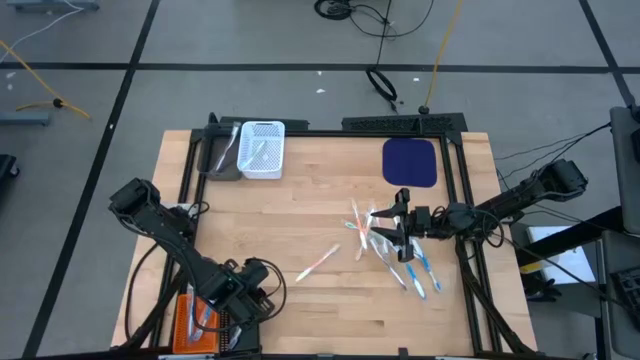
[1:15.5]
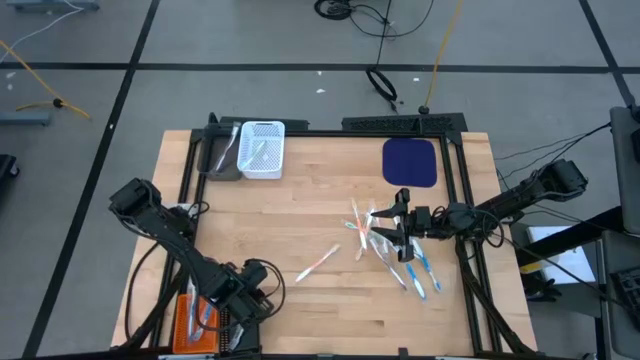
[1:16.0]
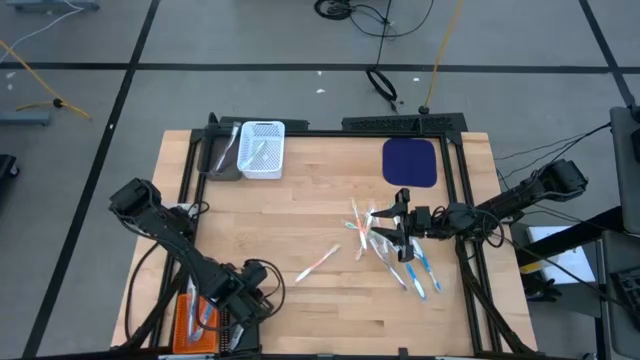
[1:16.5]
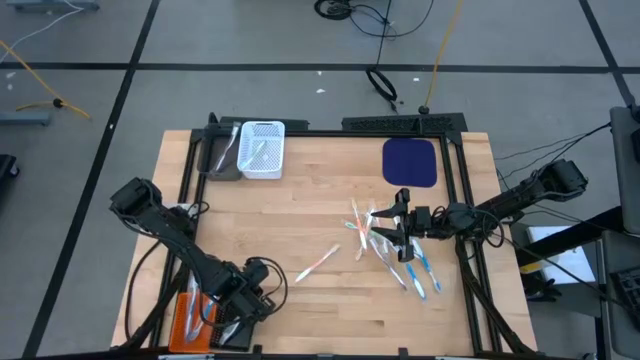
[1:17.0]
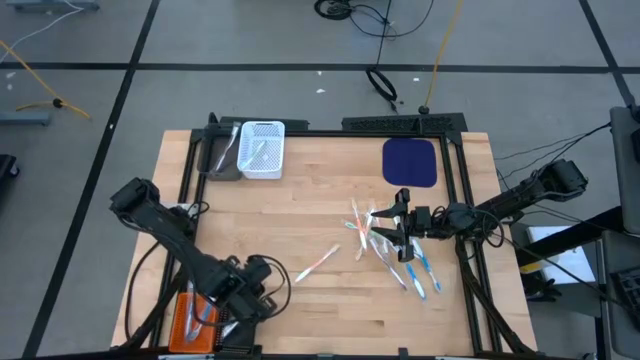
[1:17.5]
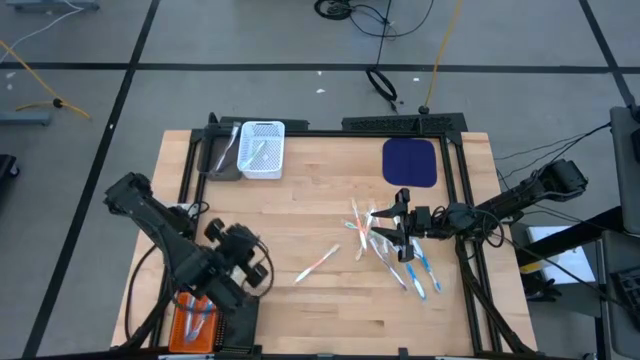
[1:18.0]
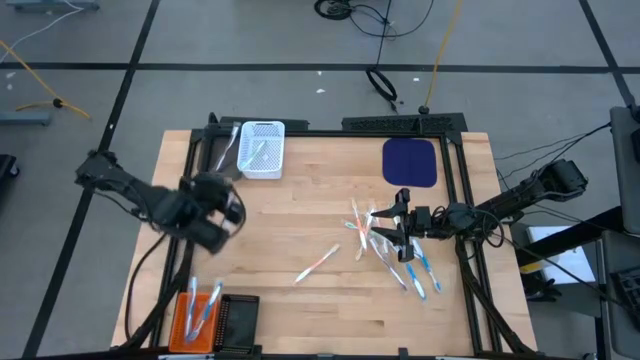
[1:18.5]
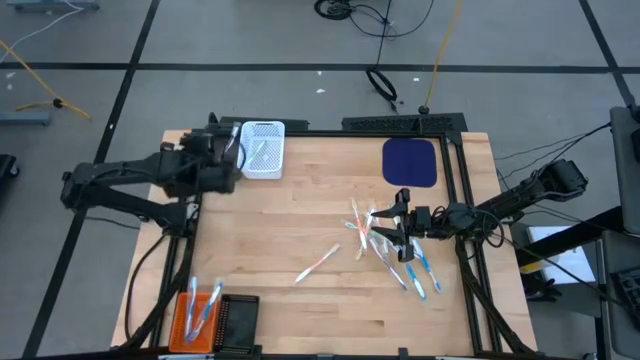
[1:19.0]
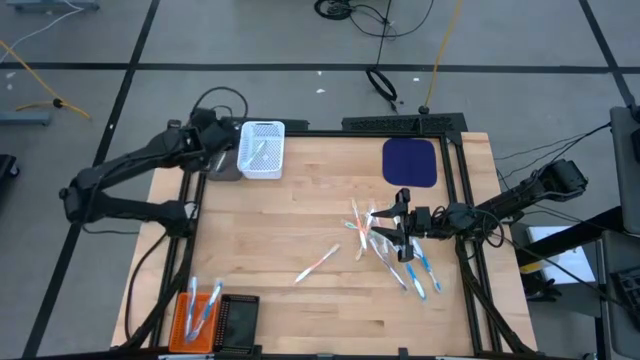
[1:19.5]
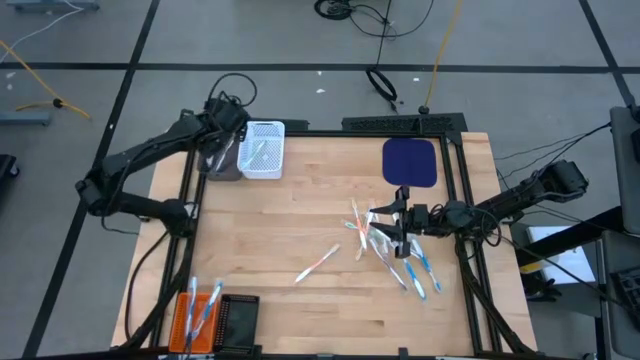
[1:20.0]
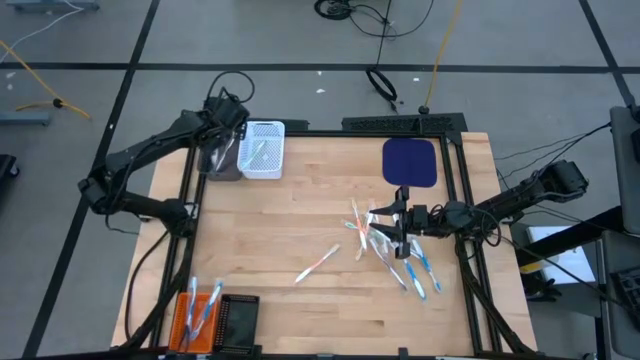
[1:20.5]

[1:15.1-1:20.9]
Task: Pick & Place Toothbrushes
Put the violet toothbrush from the black bin into the gray bin

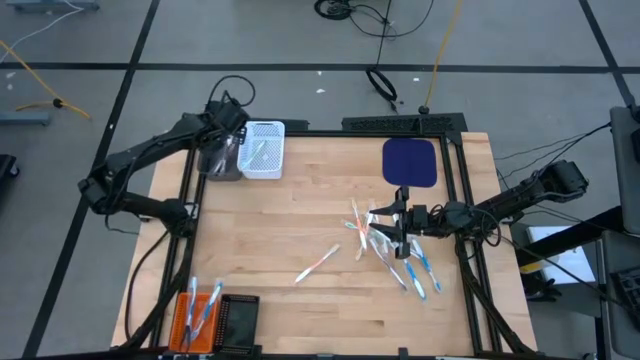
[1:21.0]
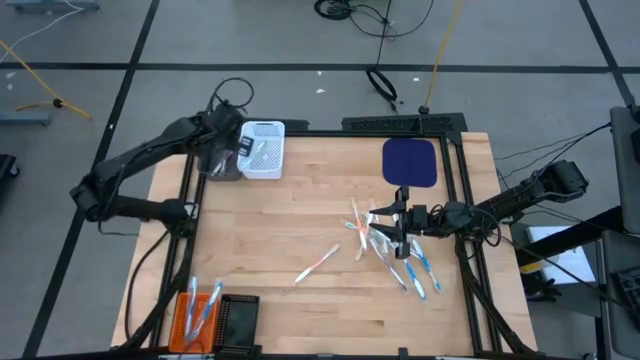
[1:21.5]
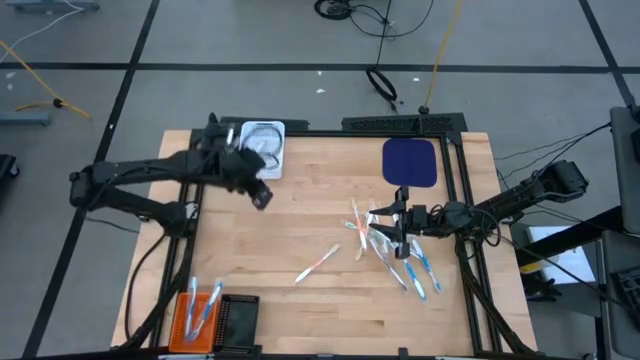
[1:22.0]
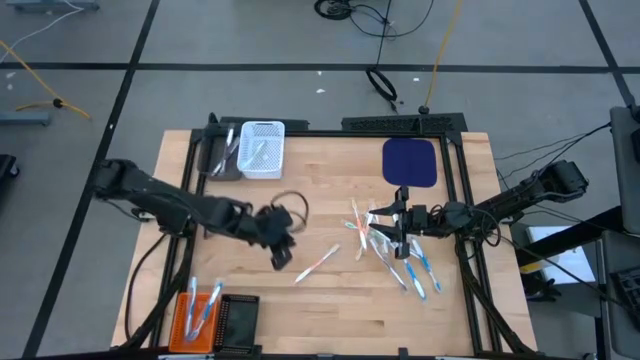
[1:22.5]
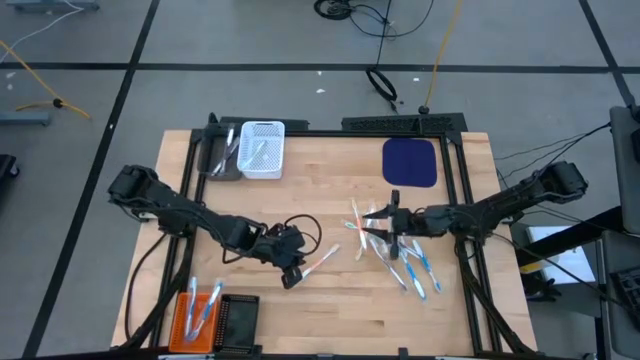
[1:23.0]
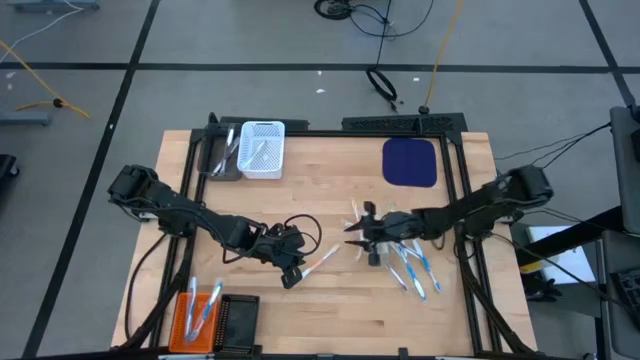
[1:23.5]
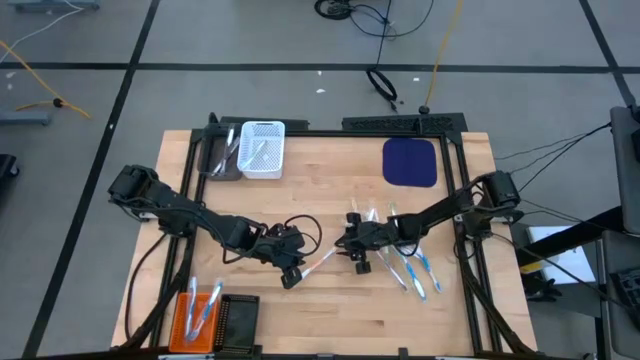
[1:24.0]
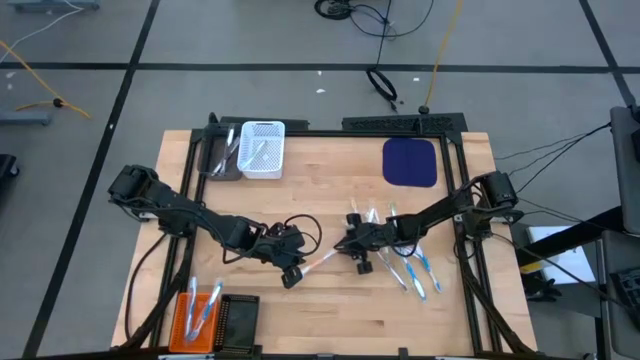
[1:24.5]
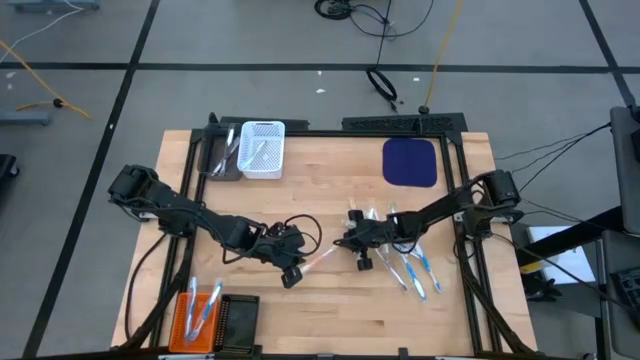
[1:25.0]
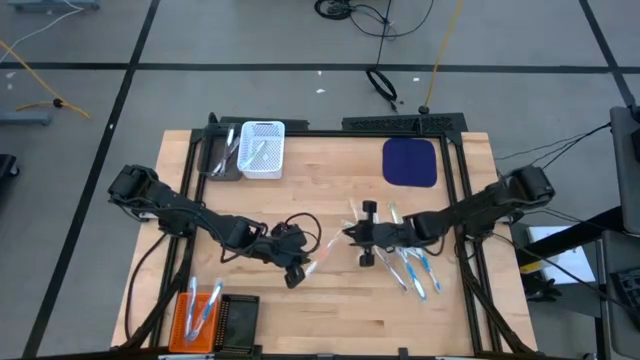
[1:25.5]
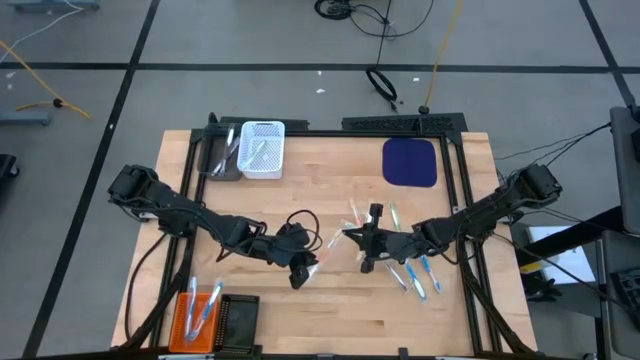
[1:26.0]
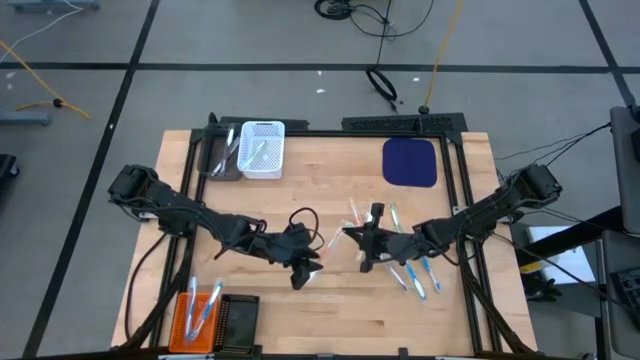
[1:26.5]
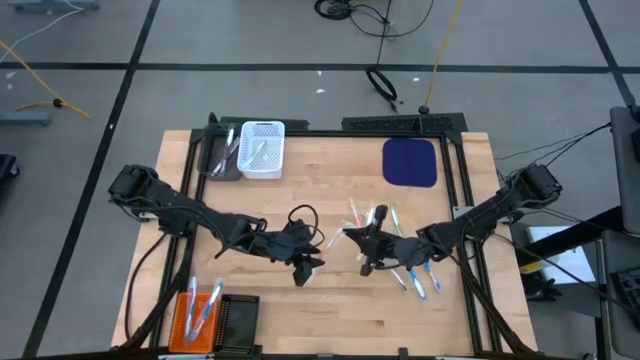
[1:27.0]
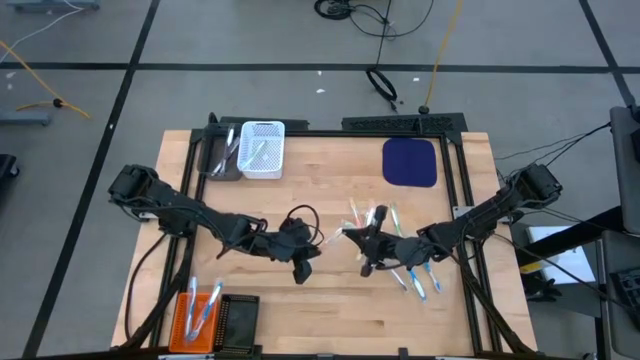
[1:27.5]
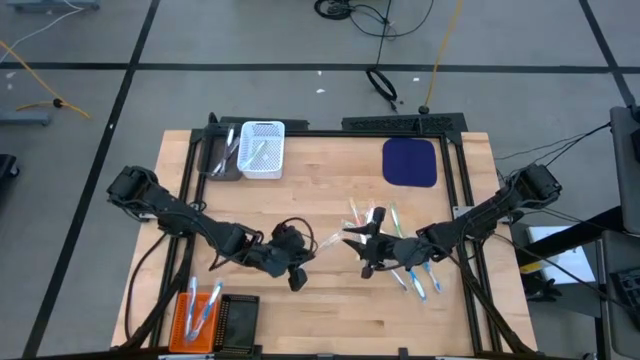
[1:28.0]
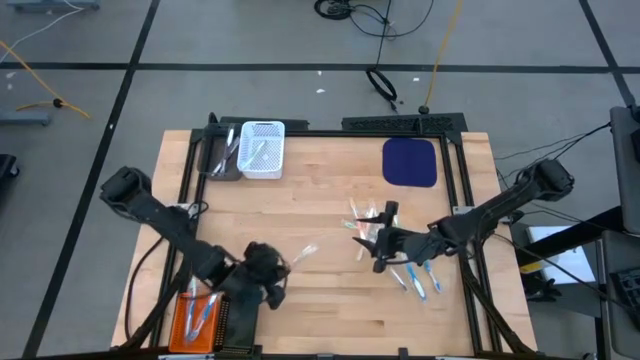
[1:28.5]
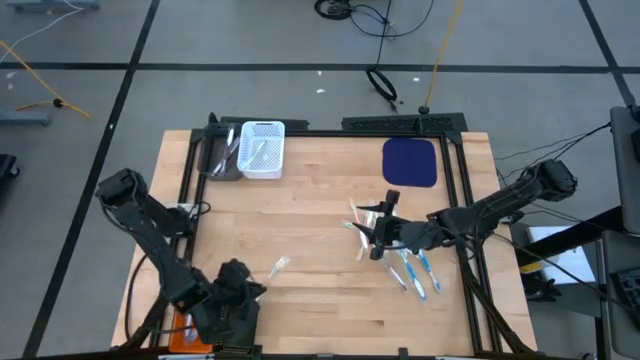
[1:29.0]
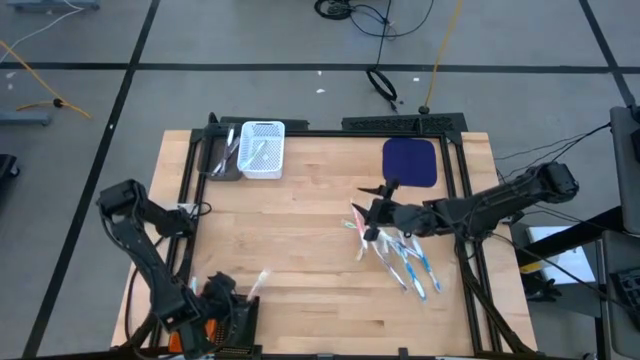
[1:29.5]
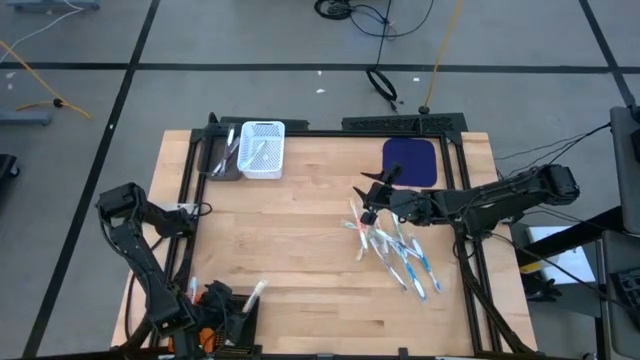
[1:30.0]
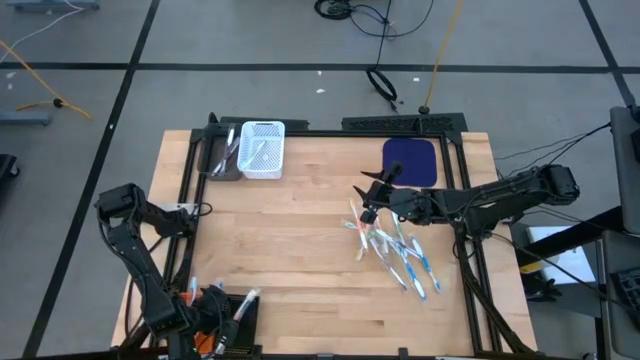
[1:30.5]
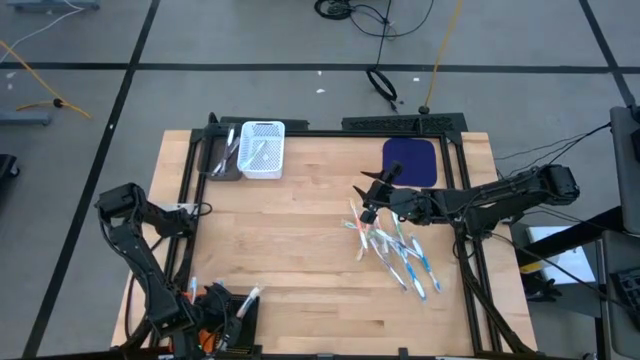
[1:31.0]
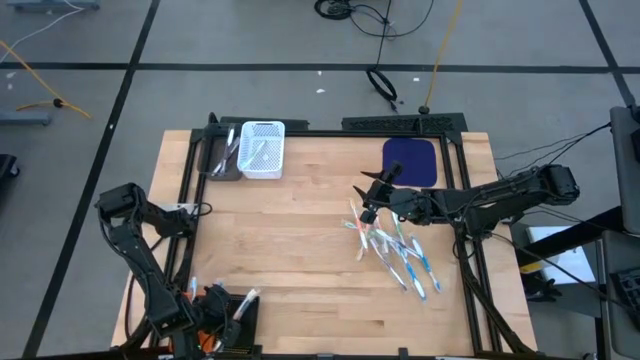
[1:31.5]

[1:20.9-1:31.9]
Put the orange toothbrush into the black bin

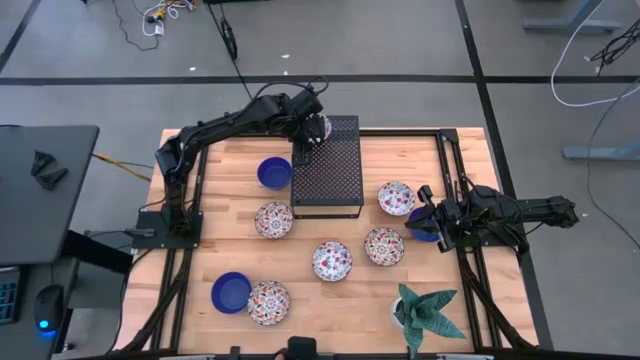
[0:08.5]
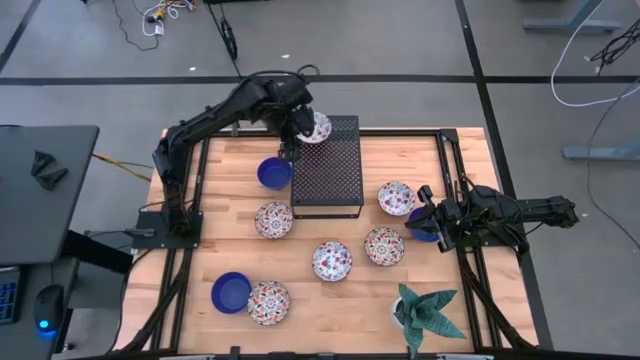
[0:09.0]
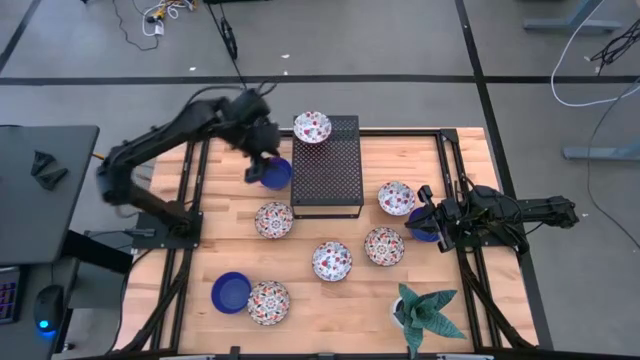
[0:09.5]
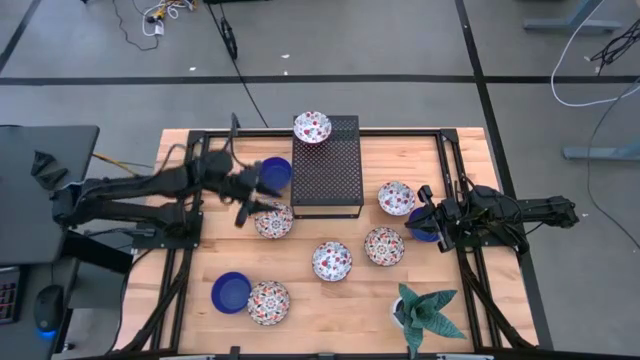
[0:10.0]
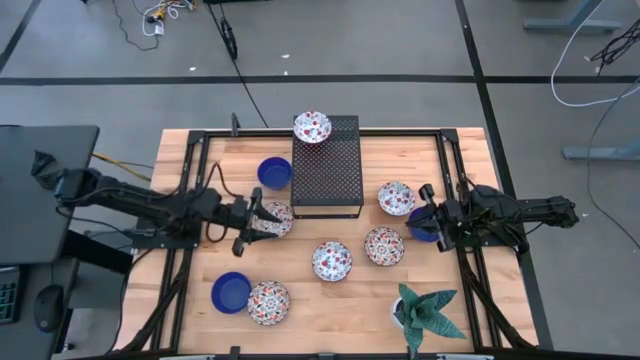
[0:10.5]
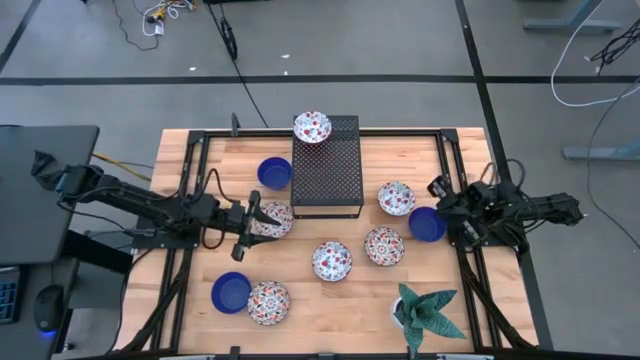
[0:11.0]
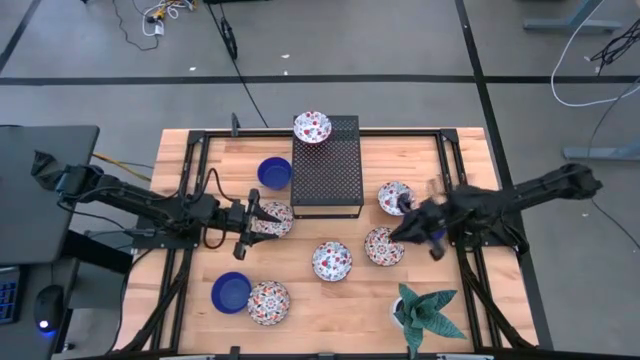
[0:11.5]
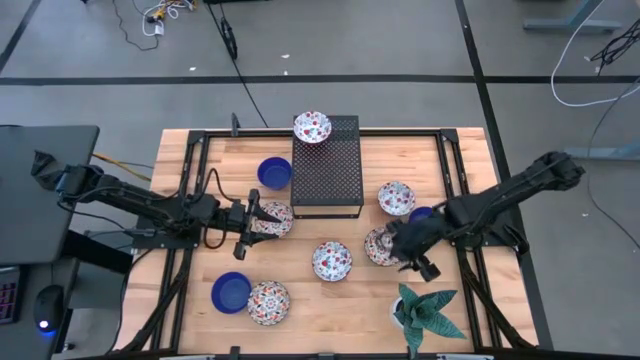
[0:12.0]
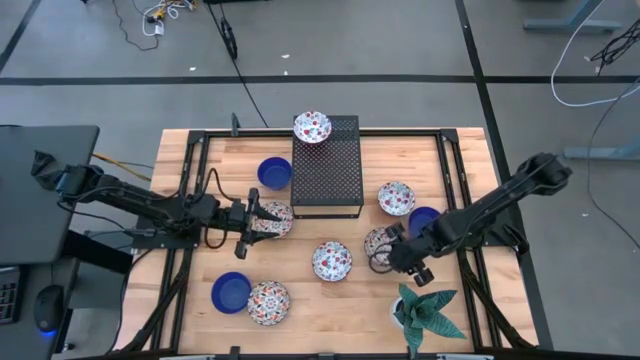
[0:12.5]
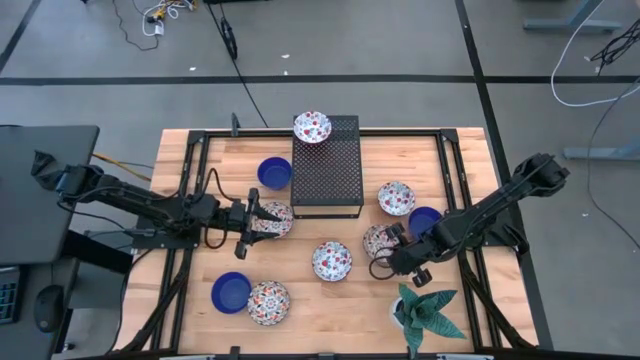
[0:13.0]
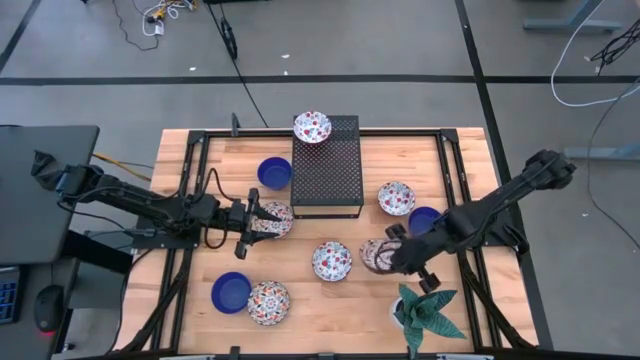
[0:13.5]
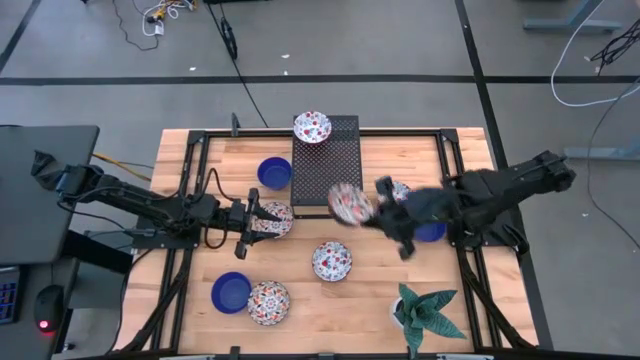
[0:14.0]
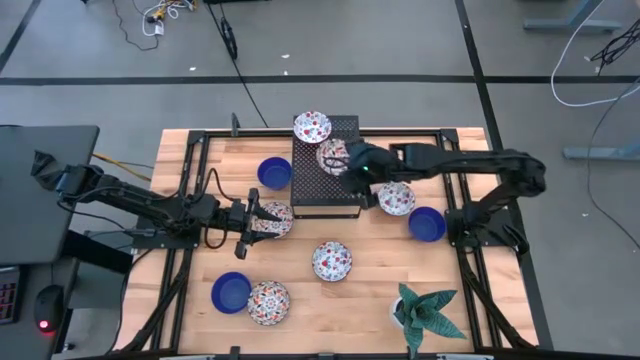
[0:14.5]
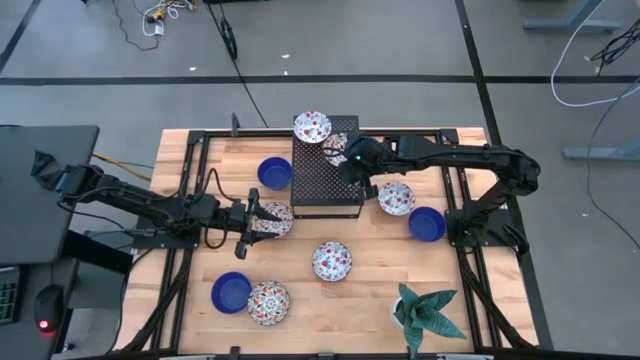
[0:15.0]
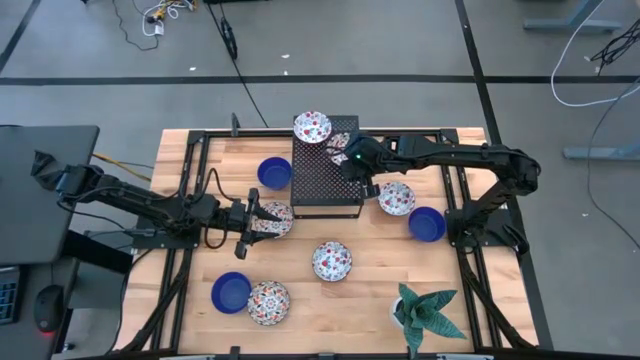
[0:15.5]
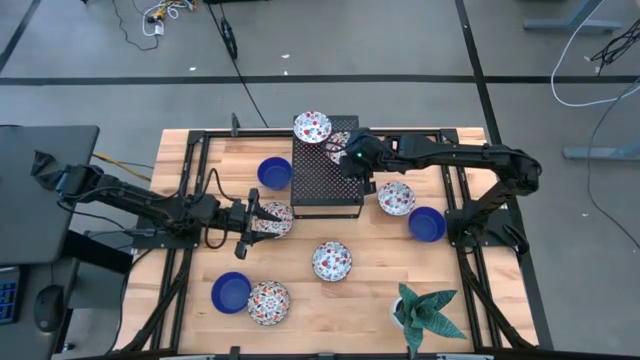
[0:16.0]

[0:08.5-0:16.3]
Task: Pick & Place Mini bowls
Put the right orange patterned bowl on the shelf
